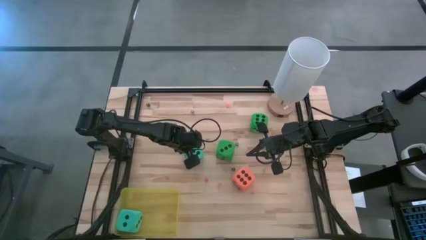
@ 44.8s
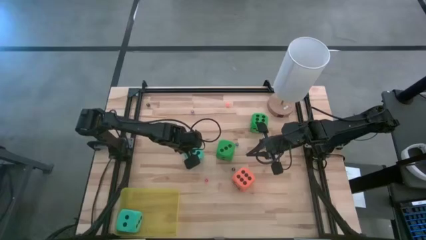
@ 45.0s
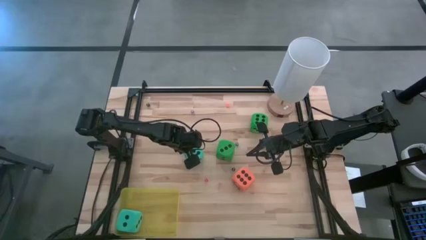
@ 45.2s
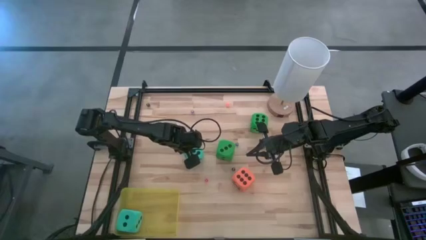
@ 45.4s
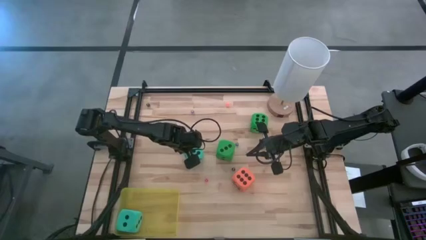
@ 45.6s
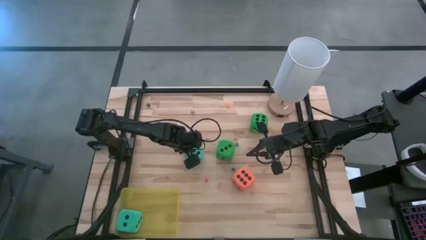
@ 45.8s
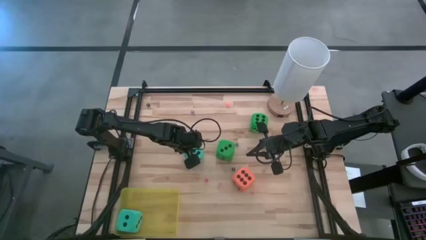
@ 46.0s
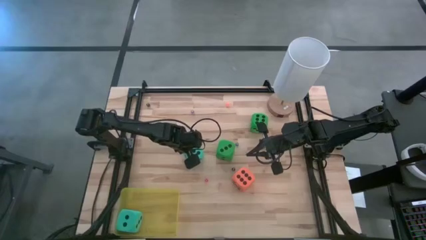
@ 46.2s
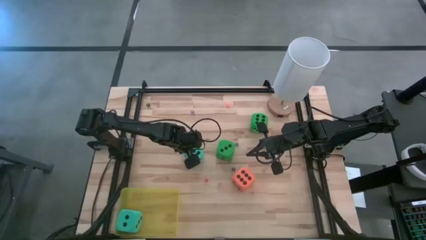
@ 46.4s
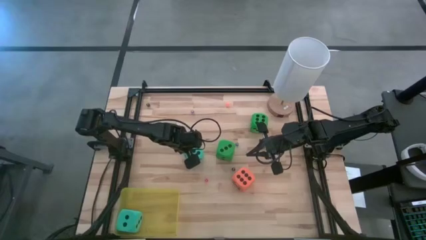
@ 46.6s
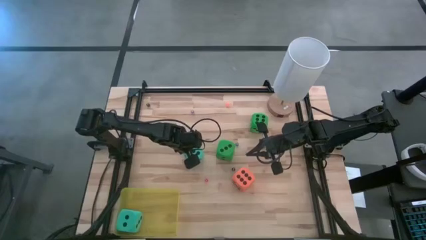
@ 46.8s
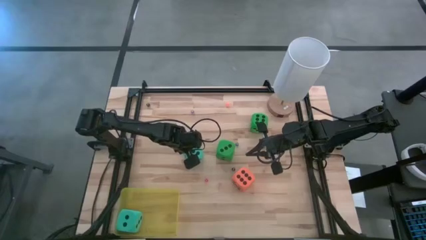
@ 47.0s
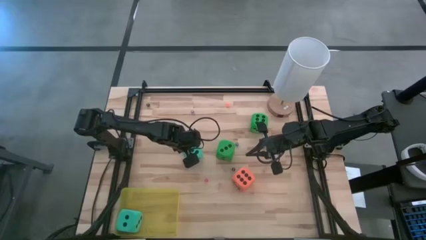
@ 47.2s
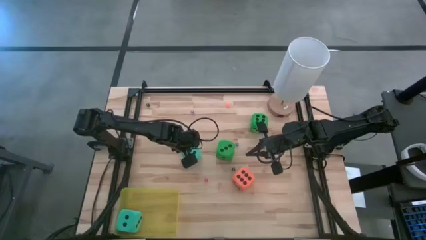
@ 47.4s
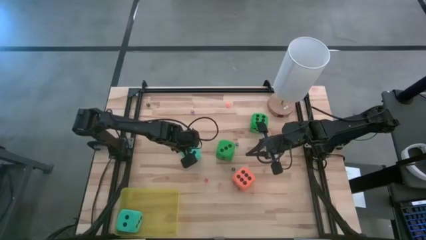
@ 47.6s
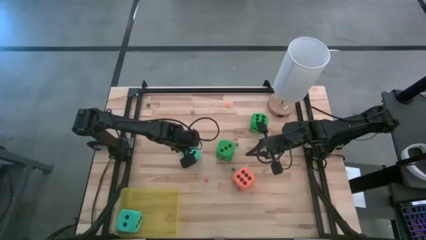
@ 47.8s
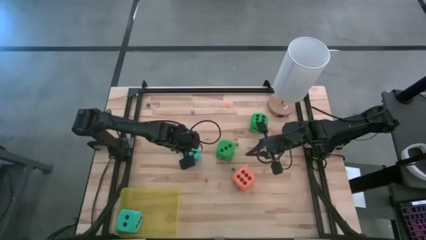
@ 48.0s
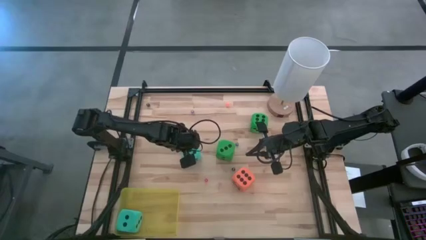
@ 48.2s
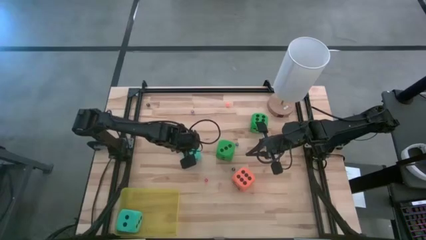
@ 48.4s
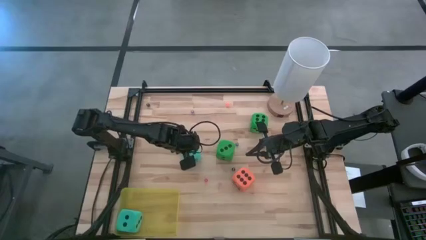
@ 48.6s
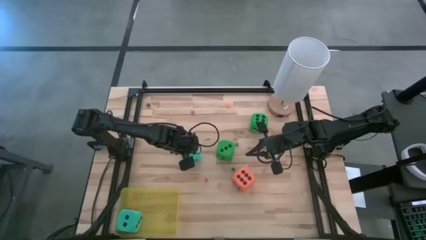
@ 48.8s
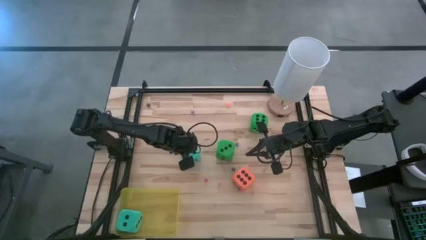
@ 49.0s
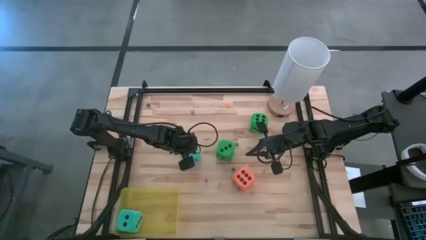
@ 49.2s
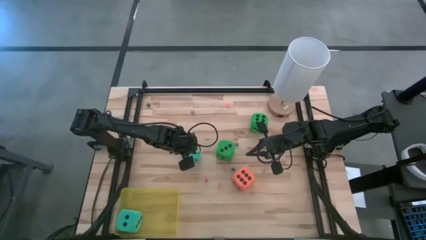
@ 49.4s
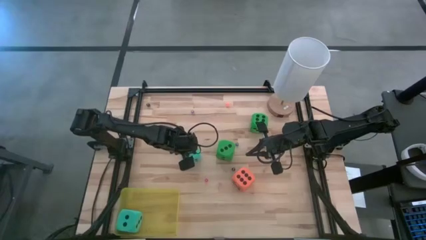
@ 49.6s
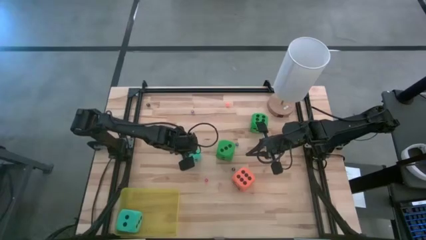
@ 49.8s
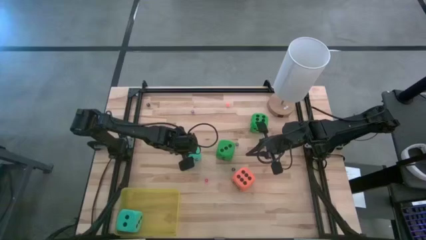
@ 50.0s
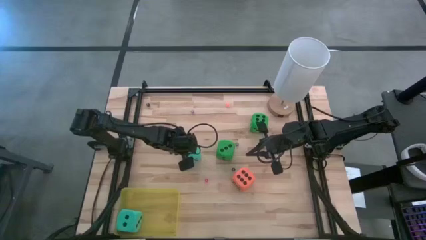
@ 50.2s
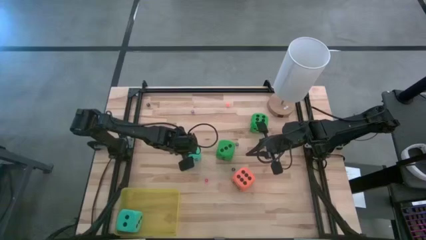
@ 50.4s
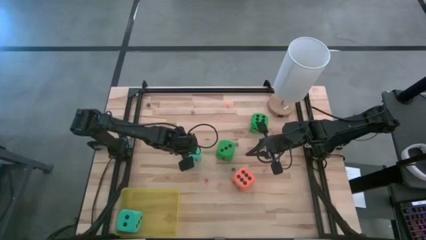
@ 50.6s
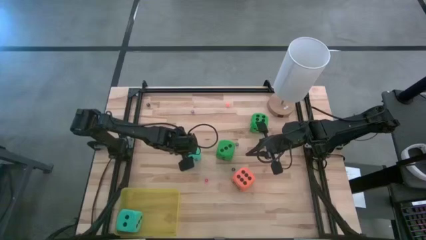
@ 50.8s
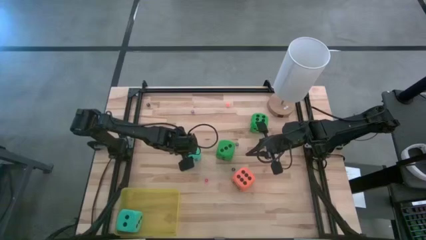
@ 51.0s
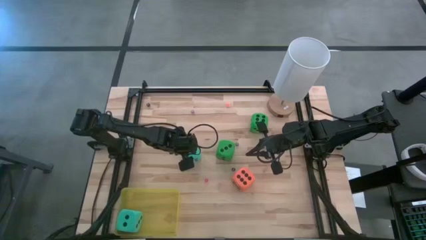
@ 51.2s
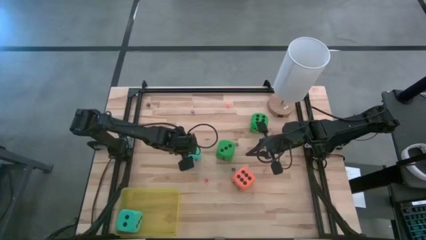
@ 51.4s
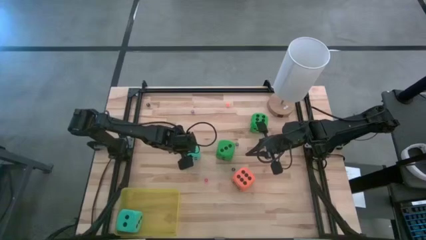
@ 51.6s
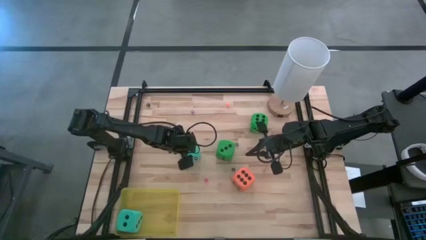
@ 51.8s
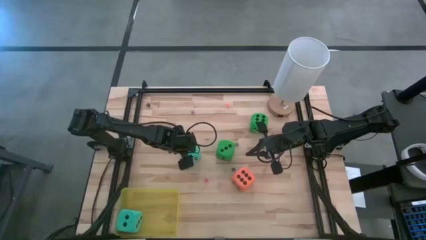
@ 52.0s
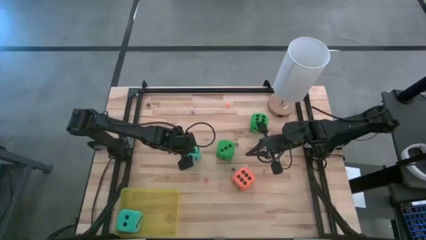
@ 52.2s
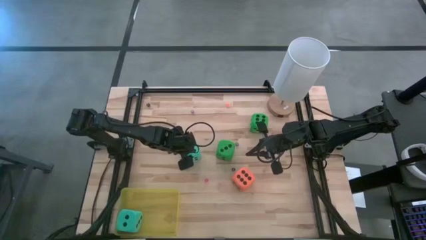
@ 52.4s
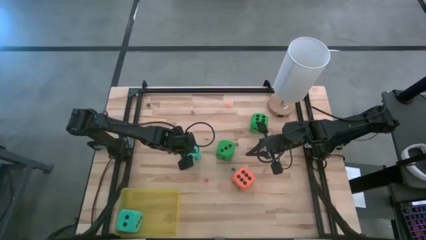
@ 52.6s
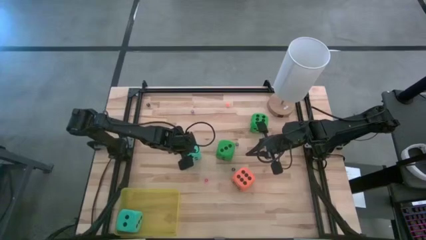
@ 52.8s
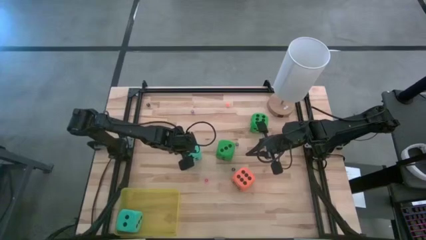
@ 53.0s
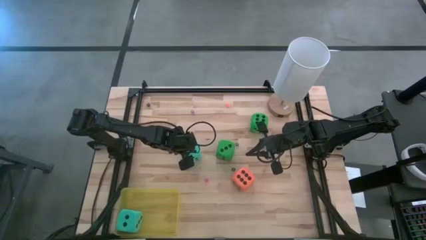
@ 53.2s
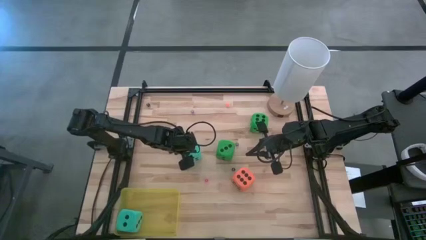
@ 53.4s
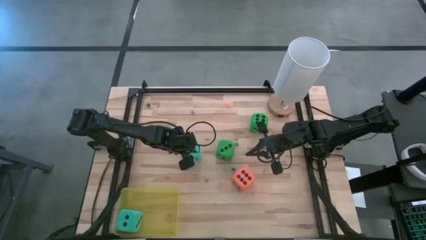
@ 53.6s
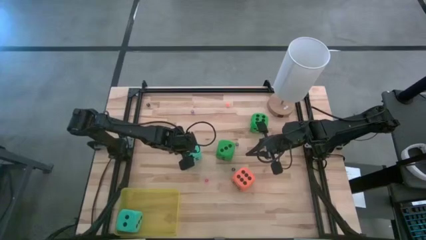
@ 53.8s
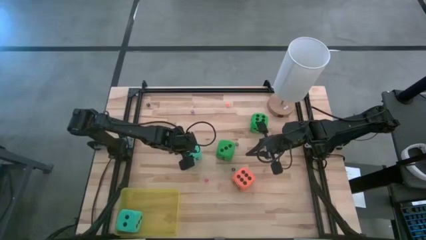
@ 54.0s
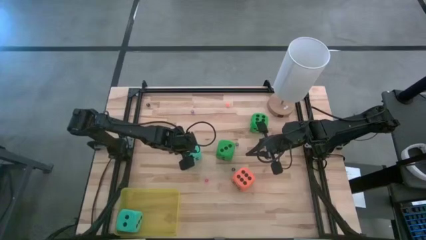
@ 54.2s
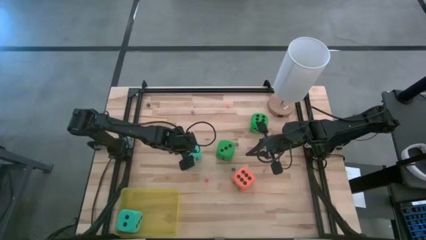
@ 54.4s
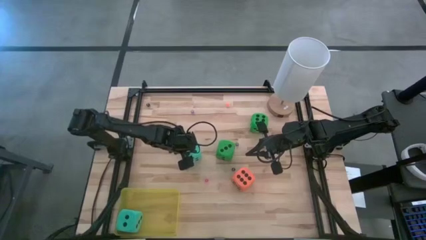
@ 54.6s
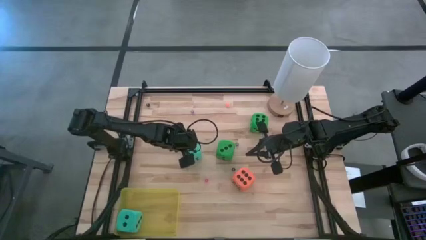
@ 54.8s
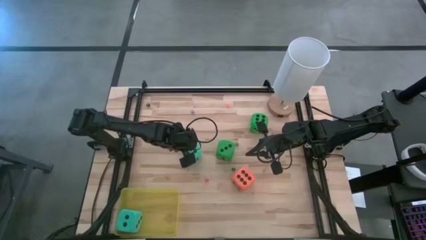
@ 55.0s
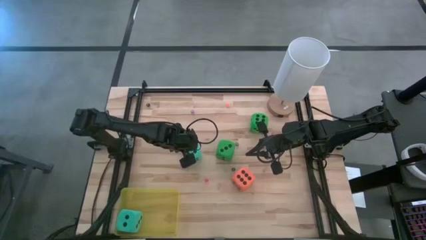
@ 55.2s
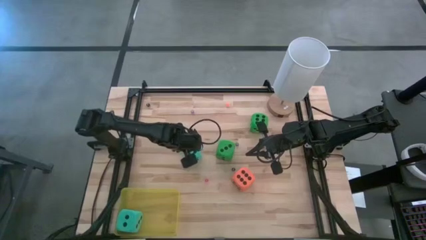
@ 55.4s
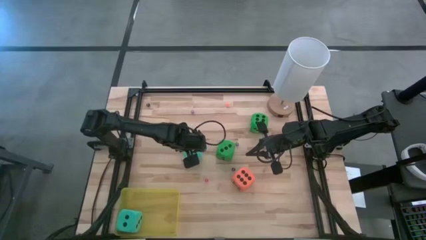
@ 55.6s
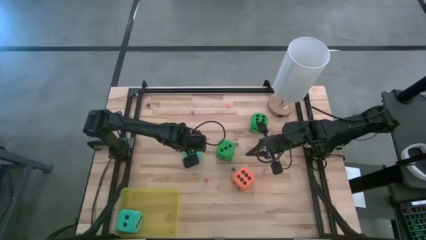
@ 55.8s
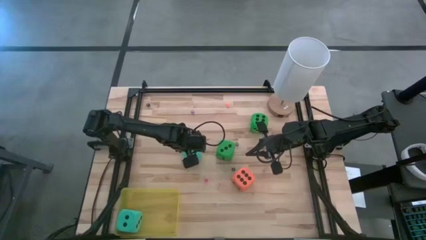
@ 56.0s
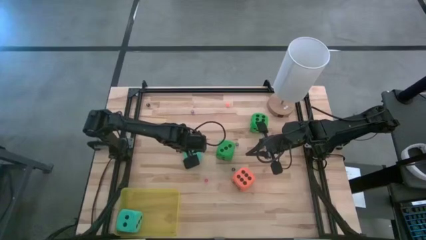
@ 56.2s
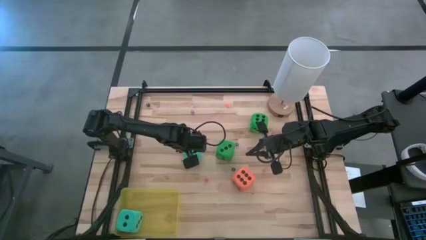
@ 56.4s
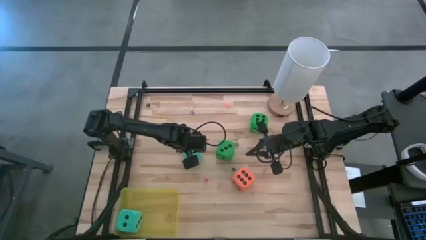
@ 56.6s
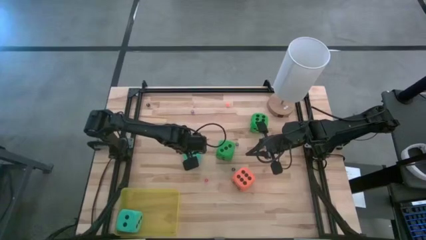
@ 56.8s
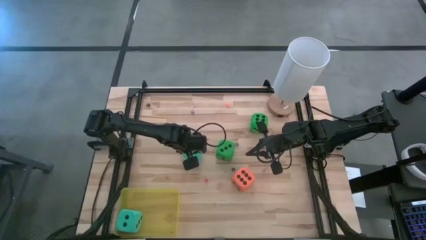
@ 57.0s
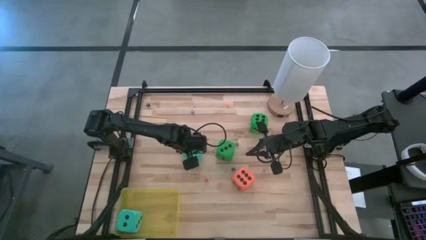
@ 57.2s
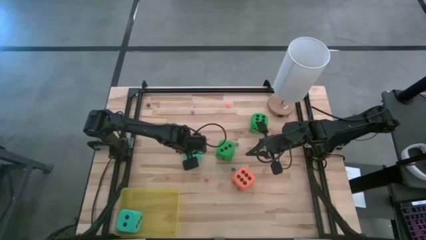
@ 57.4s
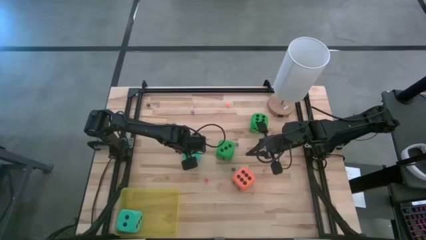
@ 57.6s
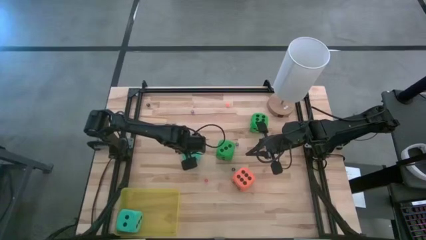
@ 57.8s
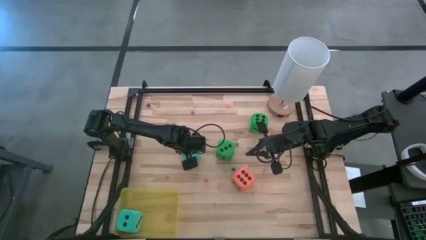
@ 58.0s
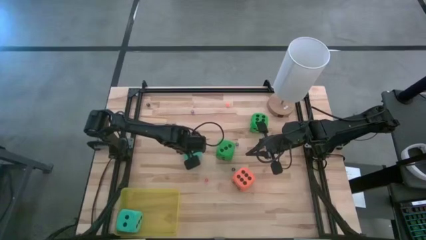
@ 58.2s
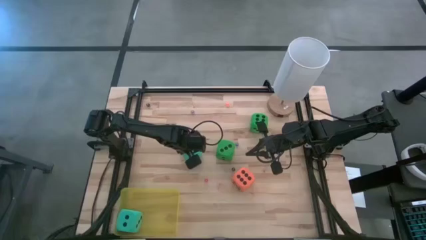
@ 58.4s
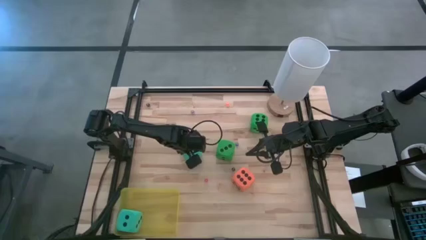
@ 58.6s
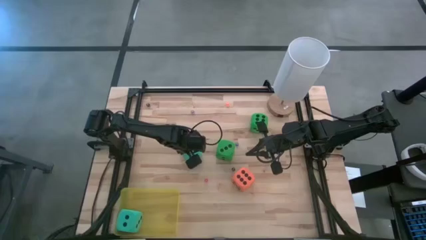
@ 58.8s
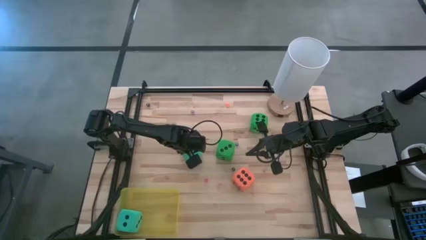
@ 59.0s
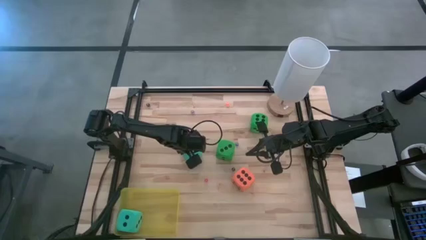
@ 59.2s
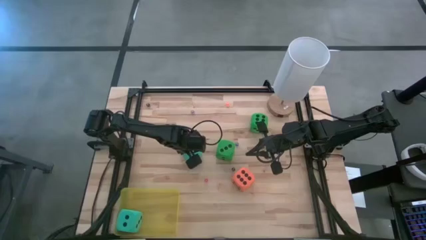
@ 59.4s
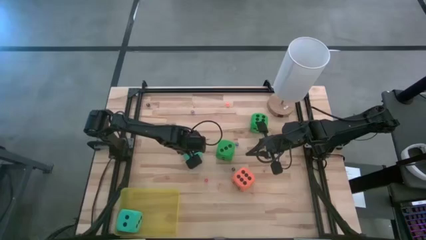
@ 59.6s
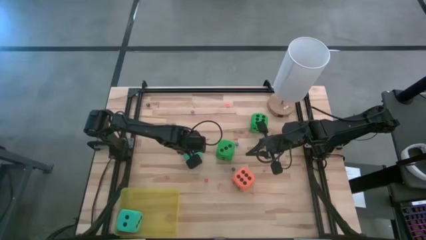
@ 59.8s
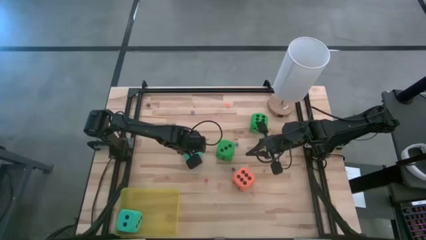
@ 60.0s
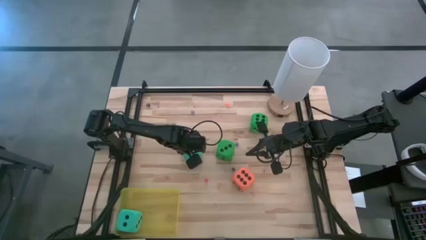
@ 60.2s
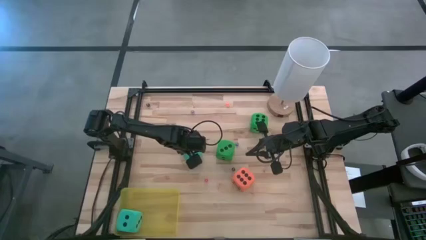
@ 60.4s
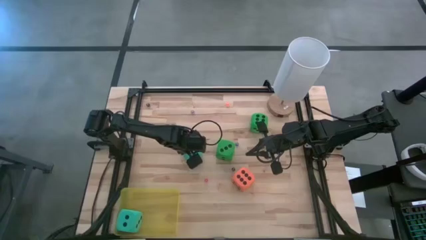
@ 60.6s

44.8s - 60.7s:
Task: Pick & Place Dice
Put the large blue dice into the yellow bin
